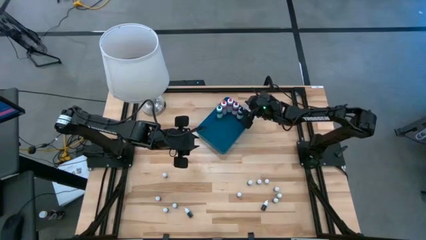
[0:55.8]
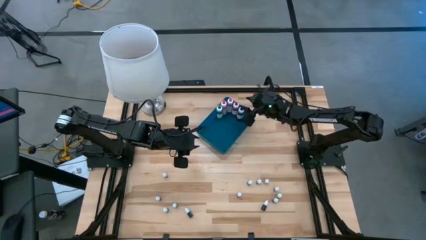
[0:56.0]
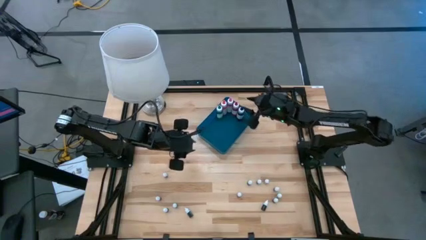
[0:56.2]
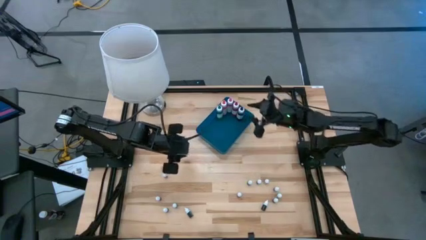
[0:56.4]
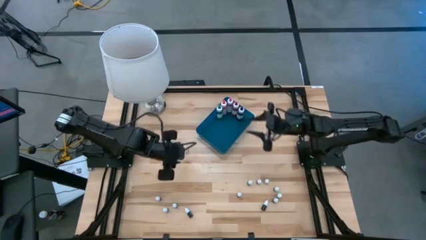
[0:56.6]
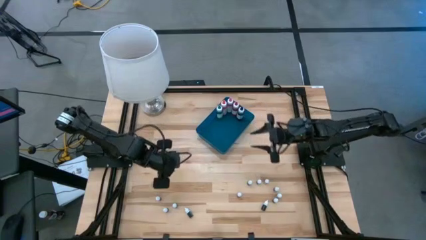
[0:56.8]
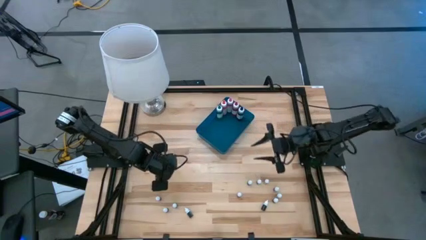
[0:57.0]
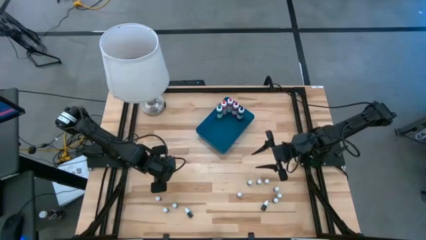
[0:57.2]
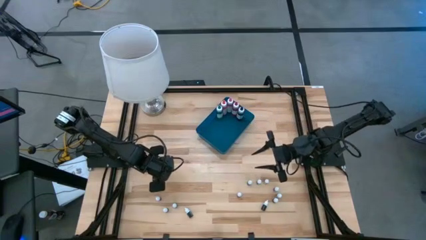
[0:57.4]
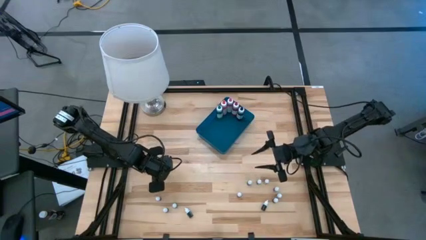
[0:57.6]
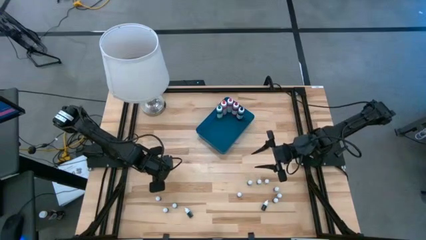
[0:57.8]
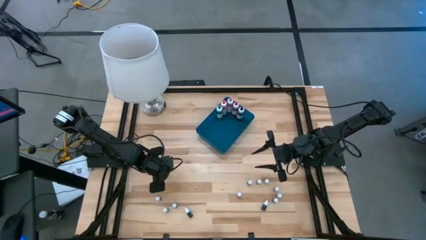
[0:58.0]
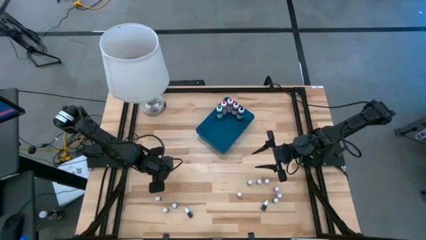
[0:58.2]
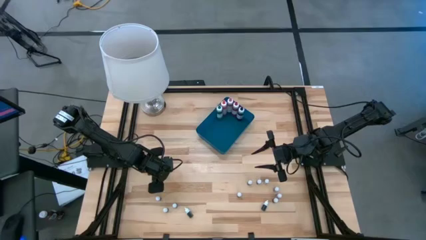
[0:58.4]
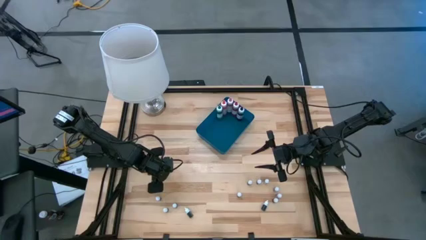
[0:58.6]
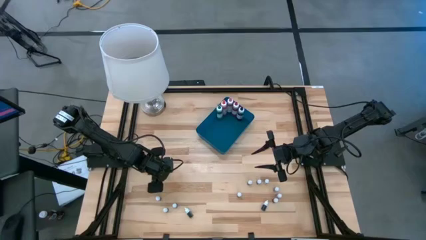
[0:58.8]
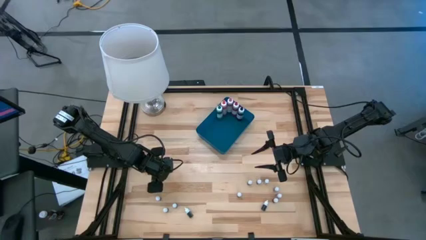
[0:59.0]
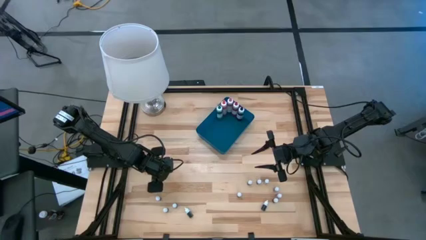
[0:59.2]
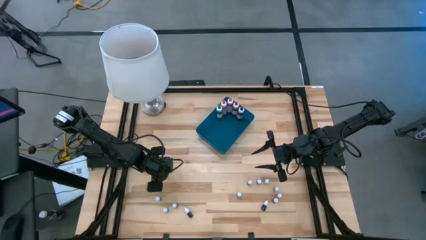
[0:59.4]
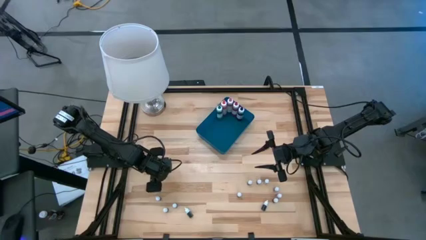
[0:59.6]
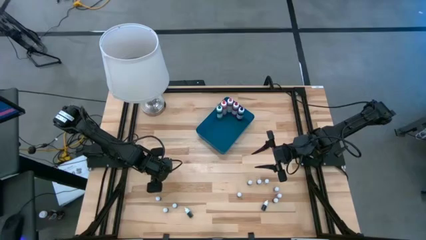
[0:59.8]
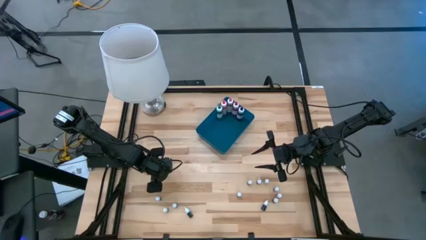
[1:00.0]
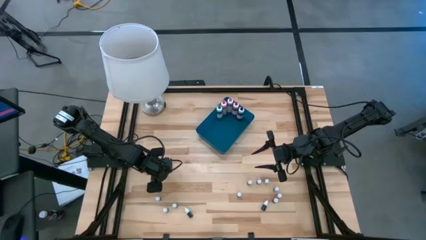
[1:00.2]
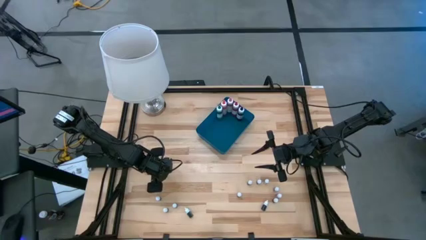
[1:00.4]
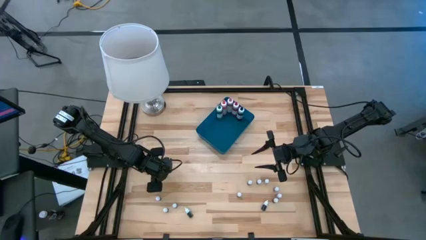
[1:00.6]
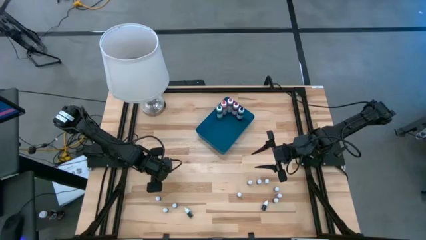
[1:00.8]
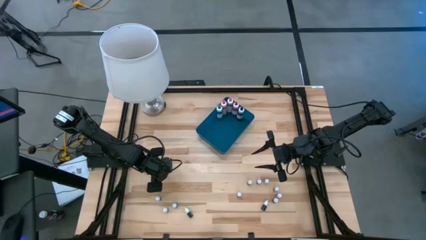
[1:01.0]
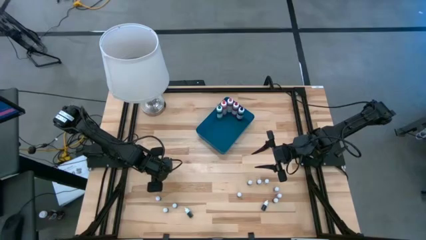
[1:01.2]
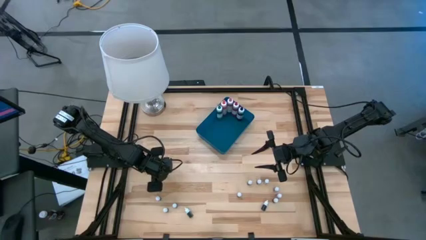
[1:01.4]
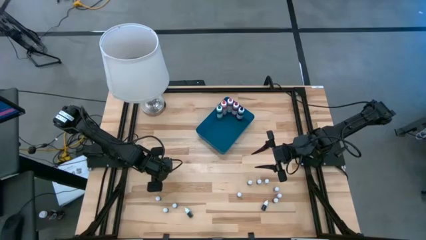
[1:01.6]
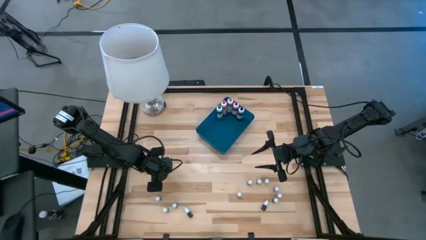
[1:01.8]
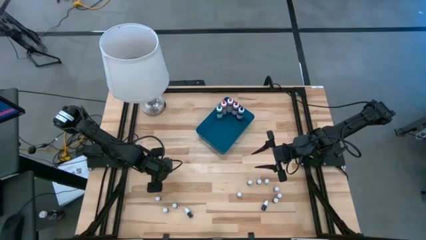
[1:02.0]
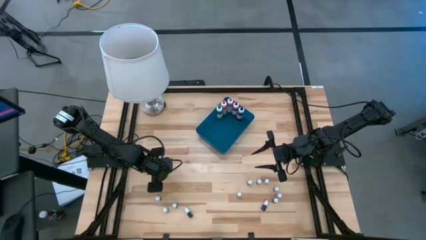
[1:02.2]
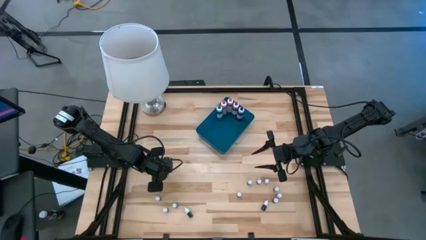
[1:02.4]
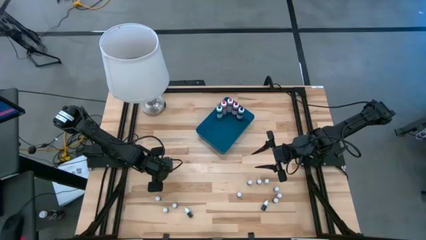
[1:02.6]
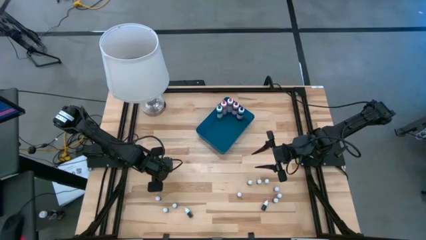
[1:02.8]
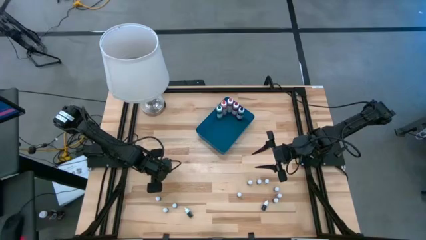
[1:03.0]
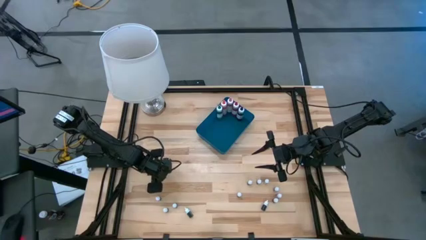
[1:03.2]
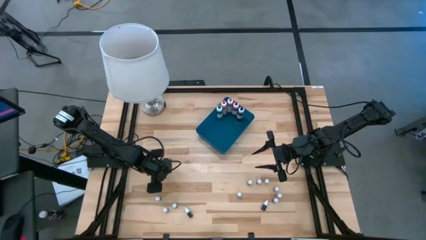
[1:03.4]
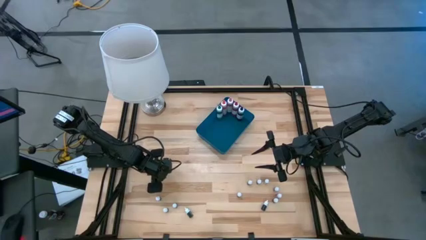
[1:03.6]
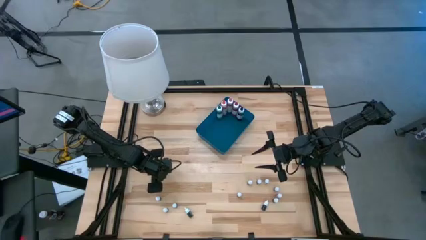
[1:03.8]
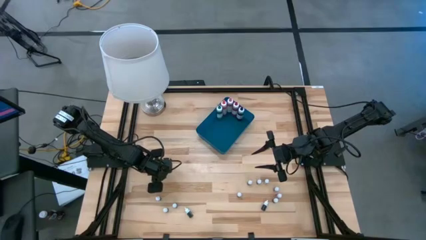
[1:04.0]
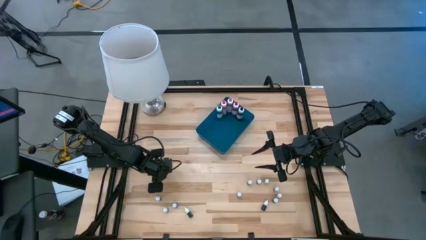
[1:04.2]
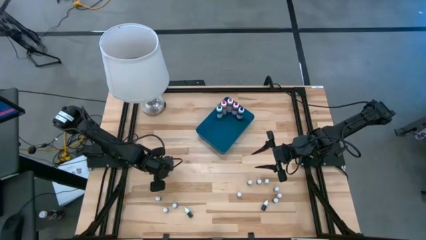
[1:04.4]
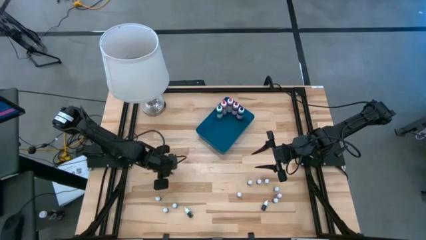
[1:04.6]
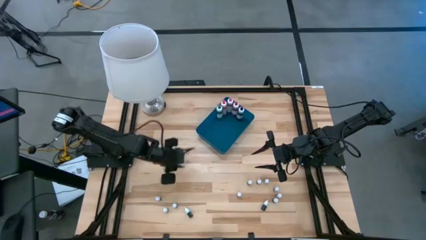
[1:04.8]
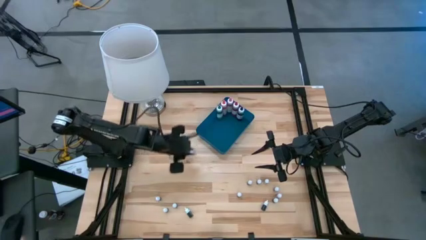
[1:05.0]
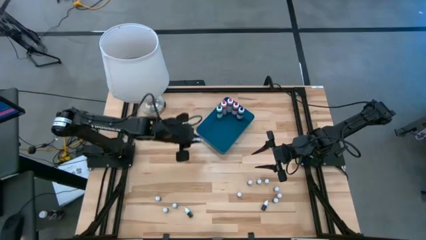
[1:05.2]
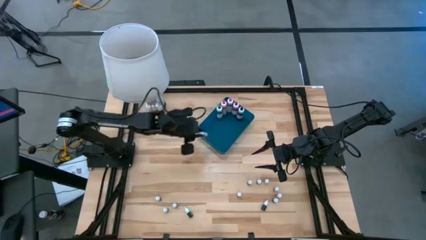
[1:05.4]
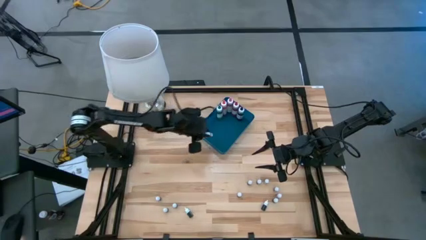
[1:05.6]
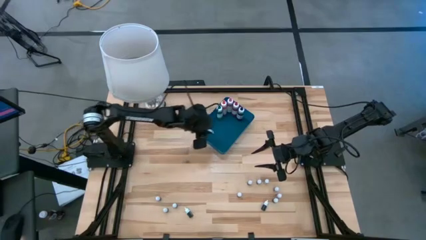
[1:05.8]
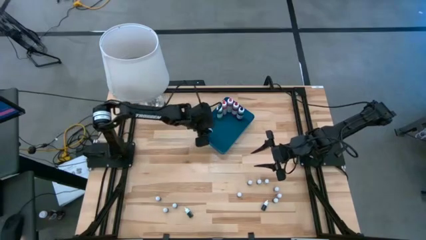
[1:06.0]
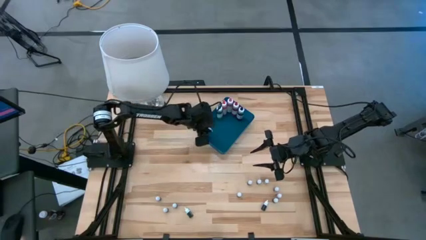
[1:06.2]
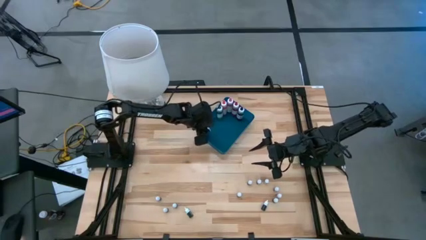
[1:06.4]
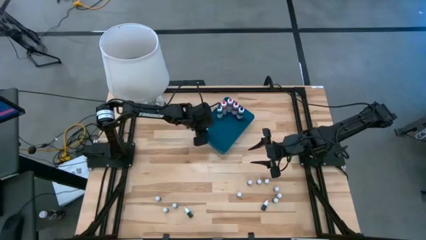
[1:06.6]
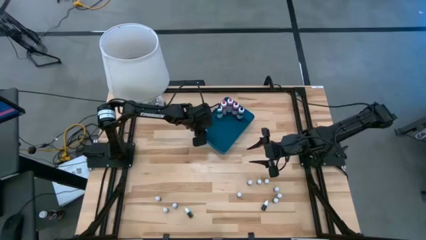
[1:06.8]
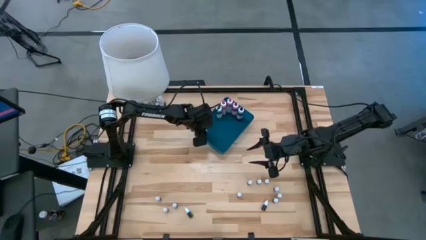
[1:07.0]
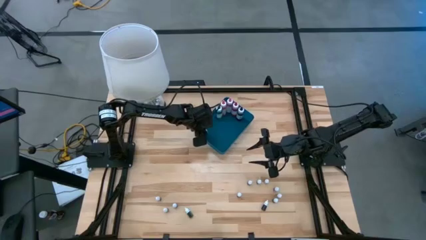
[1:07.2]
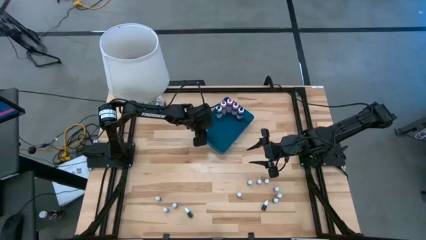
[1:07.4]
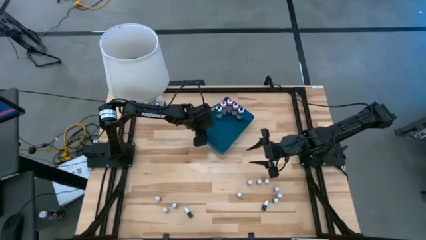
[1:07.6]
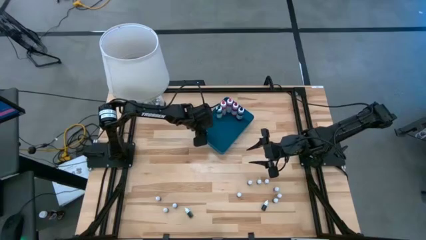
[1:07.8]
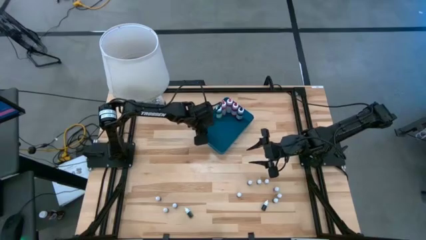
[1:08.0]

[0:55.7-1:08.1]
Task: Pick & Place food coloring
Put the small brown food coloring bottle into the blue container
